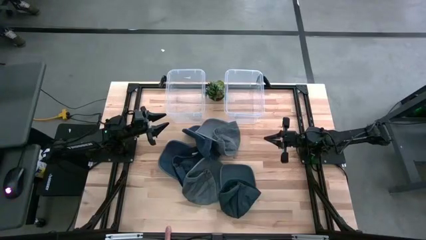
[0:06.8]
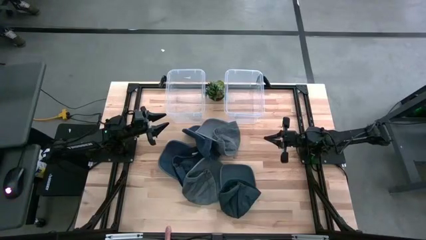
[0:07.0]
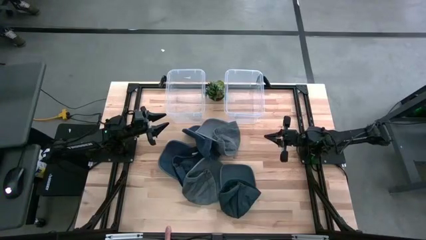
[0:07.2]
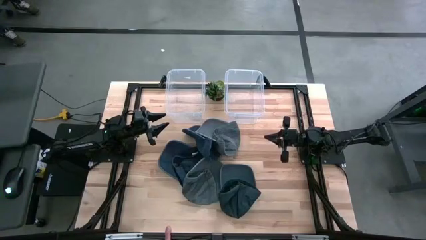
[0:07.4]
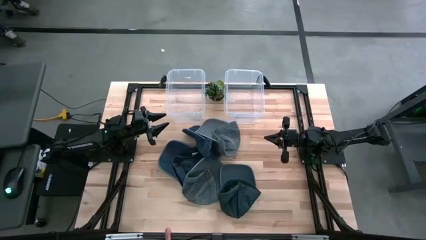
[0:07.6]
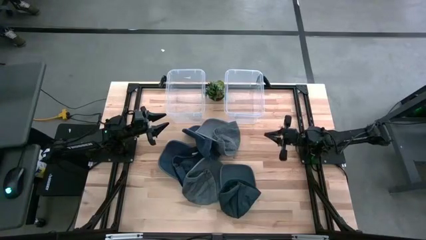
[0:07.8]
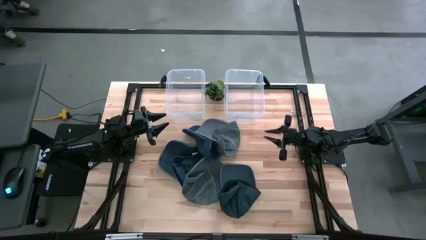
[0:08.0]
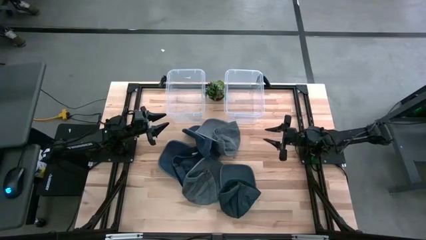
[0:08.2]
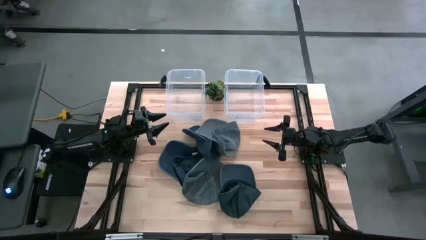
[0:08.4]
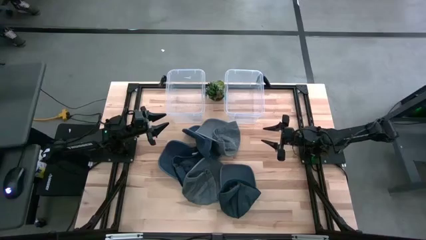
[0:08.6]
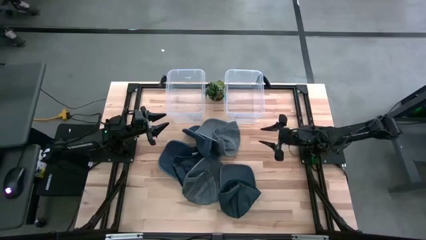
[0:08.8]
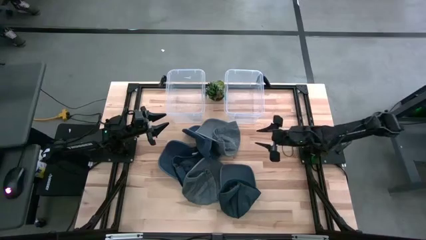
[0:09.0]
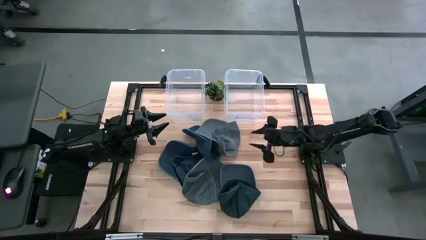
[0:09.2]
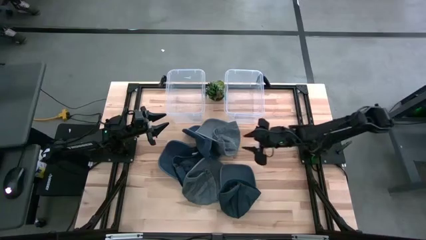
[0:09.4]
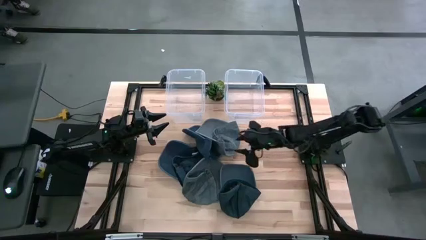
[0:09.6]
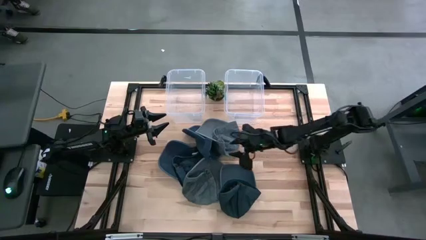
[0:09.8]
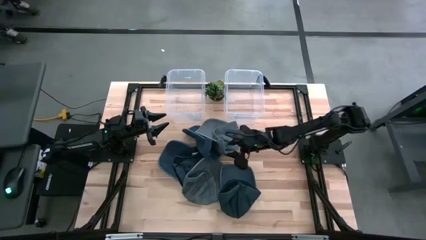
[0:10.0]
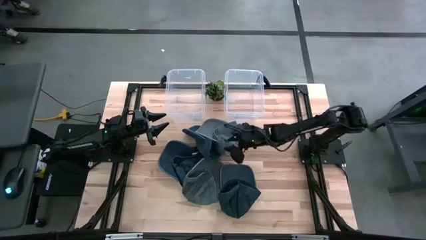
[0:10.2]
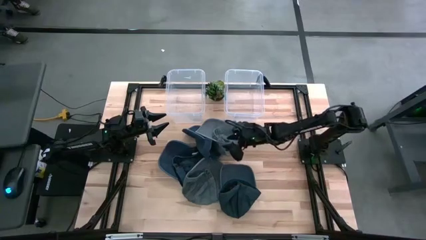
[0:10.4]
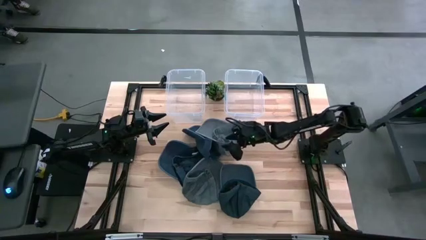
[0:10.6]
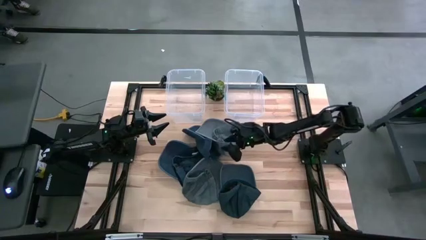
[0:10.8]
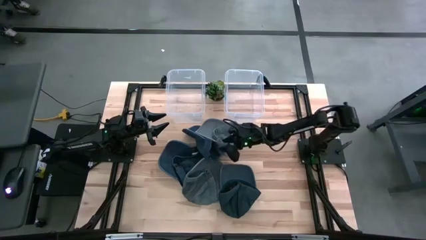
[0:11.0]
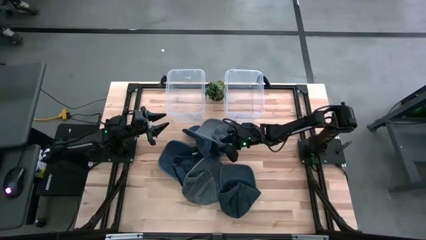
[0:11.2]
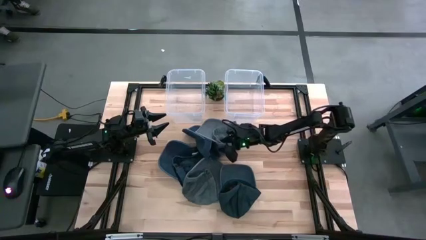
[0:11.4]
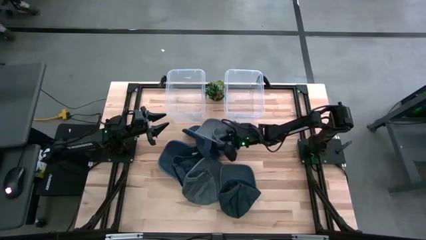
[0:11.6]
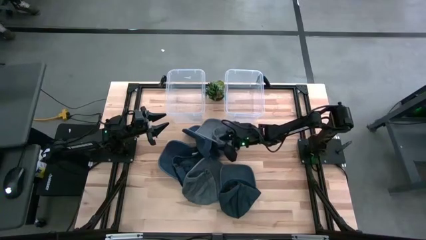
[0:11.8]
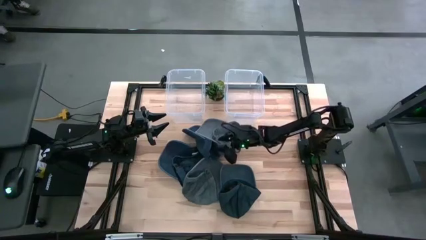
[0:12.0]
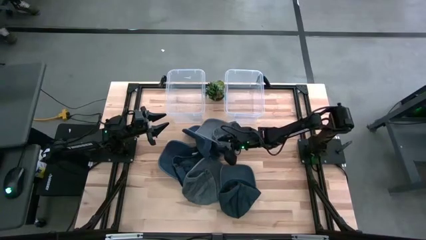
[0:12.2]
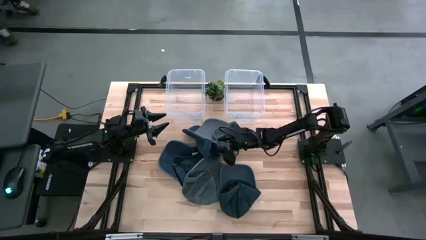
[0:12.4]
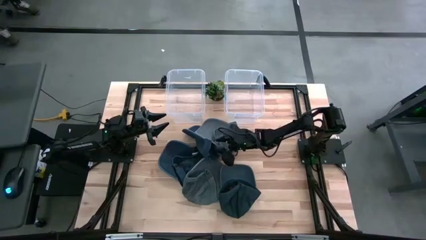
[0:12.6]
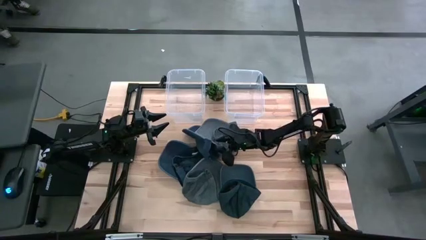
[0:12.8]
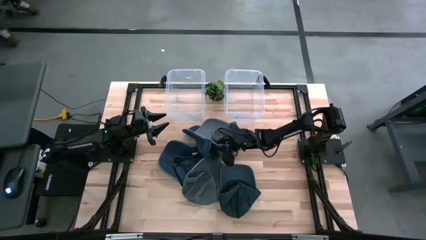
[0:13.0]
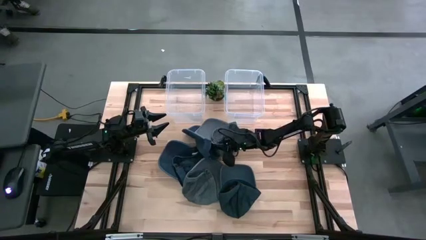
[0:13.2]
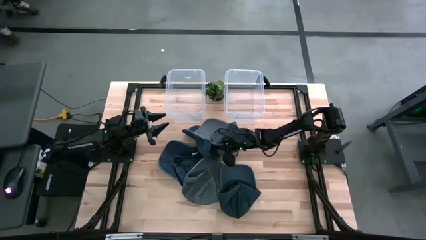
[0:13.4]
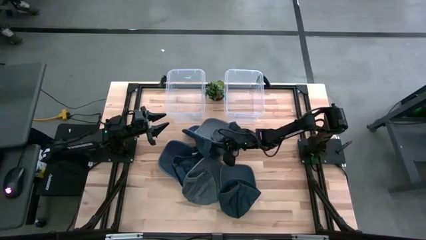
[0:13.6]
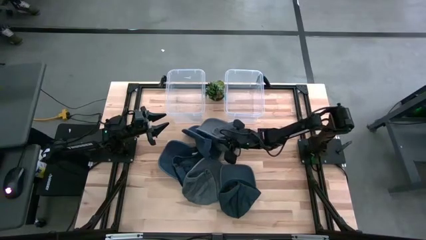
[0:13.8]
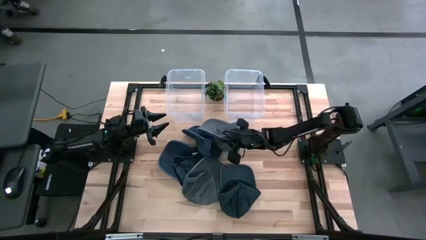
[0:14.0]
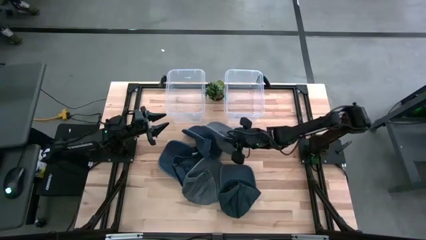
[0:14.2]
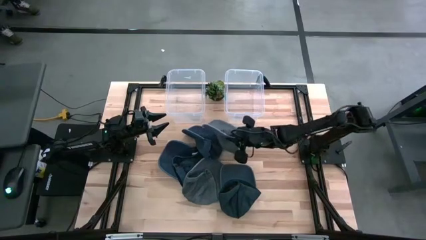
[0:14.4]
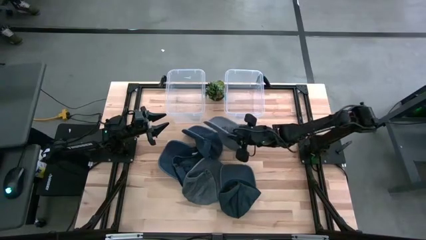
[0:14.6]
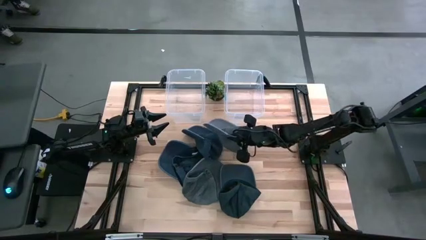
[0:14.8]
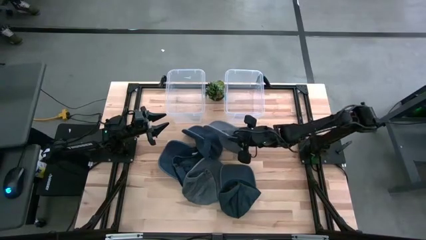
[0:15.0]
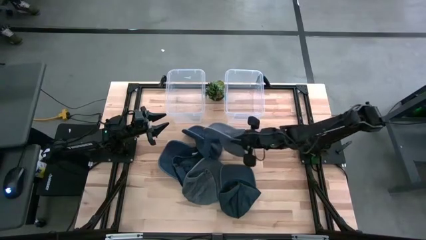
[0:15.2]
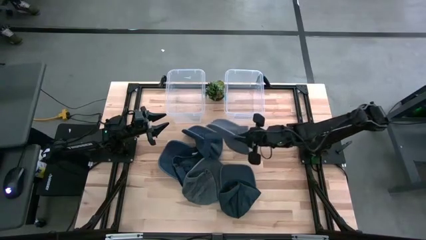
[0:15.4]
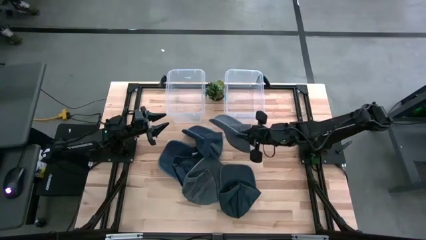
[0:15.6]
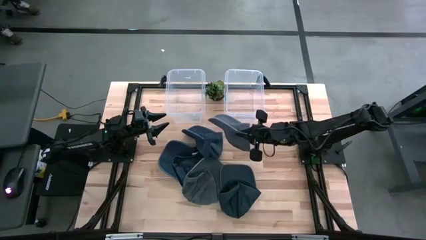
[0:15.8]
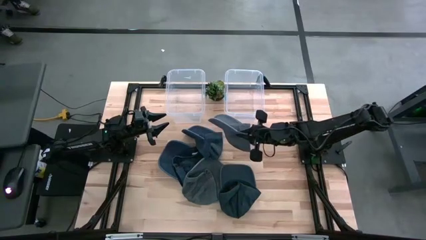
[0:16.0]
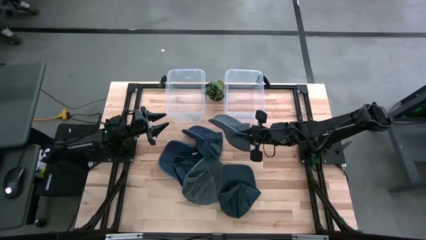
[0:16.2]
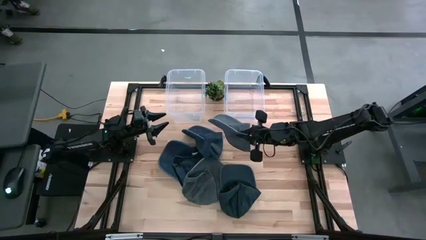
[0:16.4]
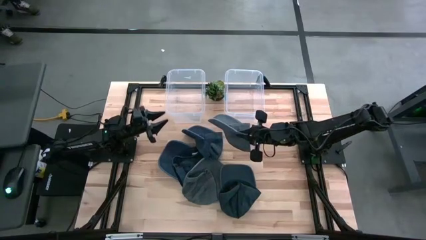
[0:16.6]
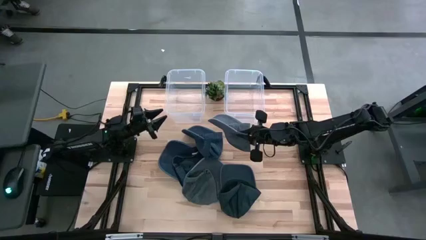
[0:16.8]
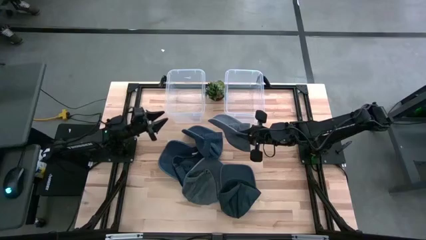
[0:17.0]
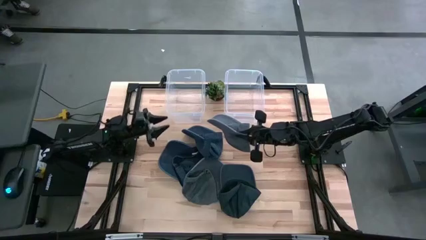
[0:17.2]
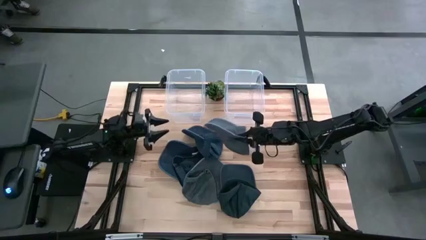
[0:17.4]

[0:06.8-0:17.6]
Task: Pick & Place hat
Put the top gray cap into the left transparent bin

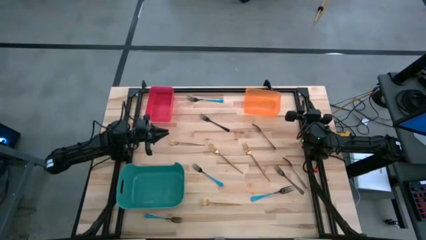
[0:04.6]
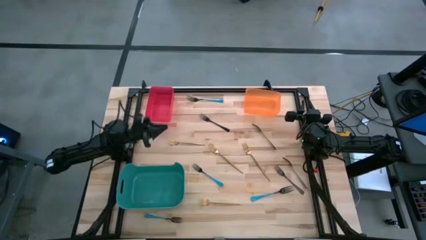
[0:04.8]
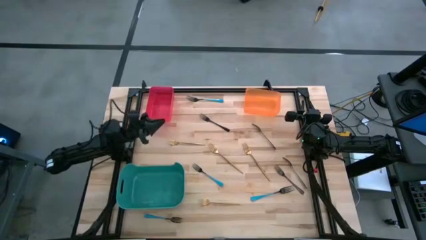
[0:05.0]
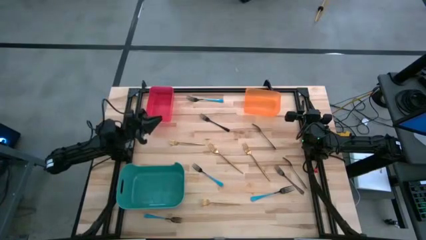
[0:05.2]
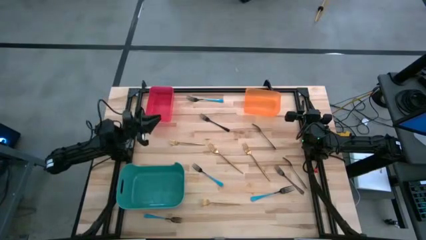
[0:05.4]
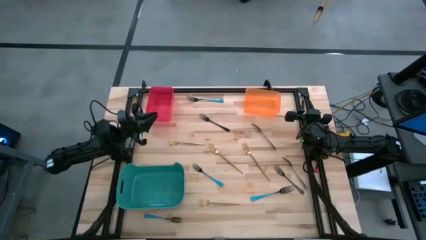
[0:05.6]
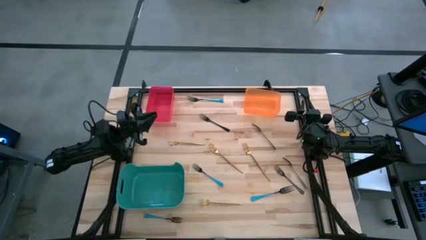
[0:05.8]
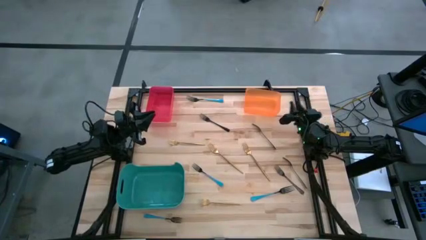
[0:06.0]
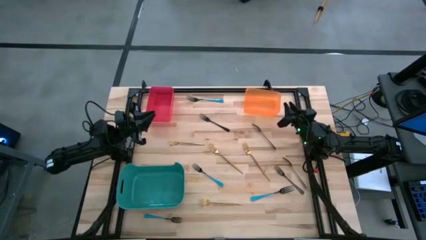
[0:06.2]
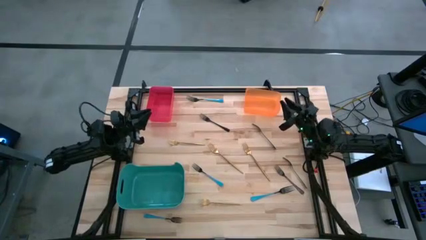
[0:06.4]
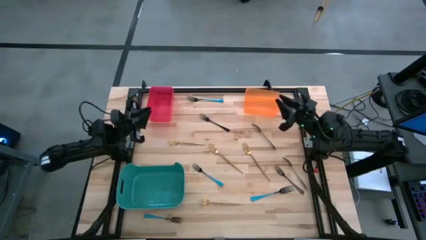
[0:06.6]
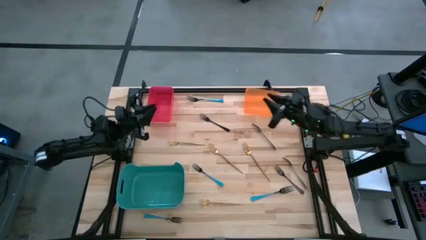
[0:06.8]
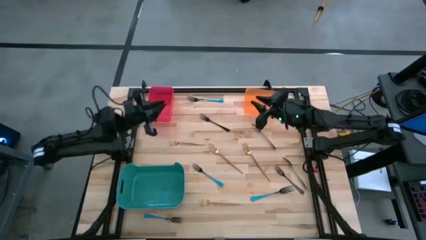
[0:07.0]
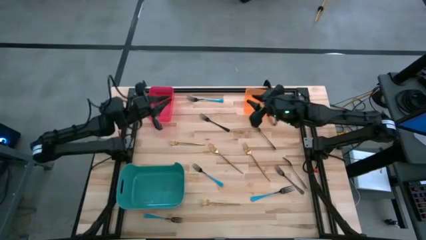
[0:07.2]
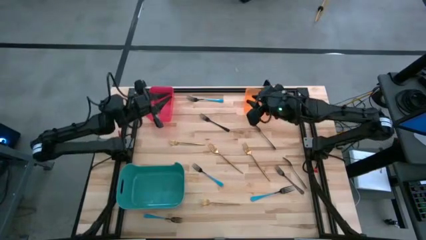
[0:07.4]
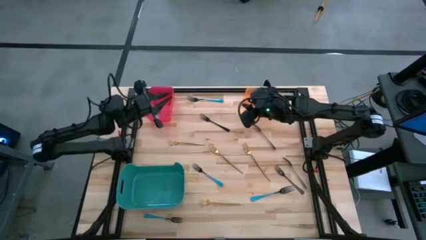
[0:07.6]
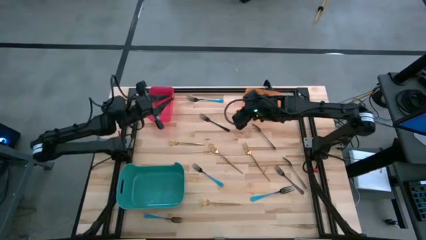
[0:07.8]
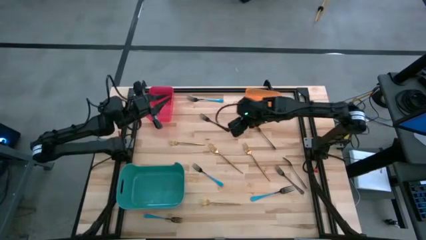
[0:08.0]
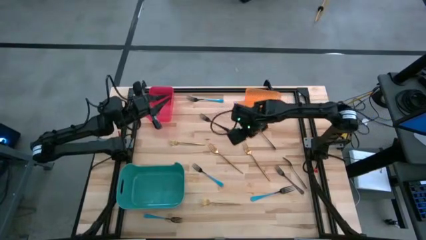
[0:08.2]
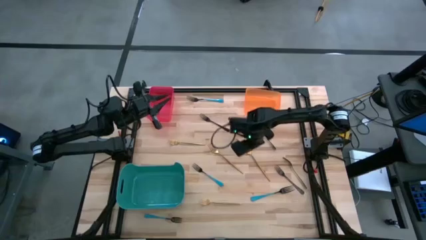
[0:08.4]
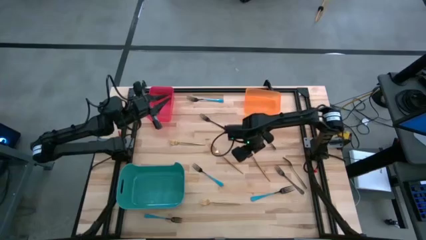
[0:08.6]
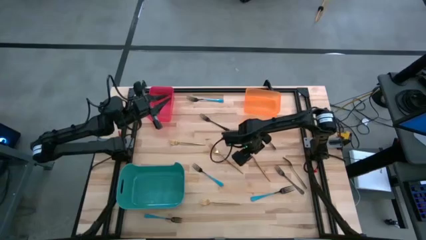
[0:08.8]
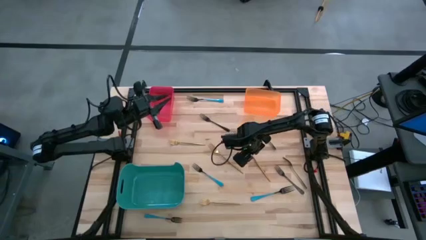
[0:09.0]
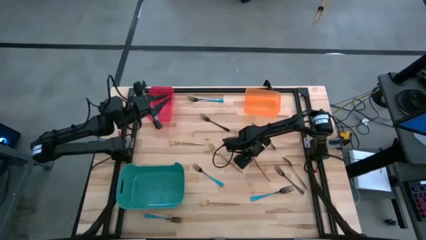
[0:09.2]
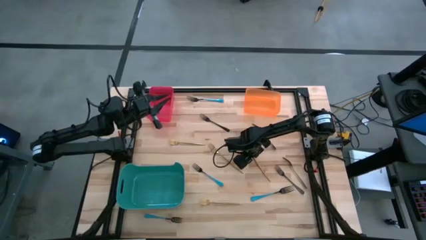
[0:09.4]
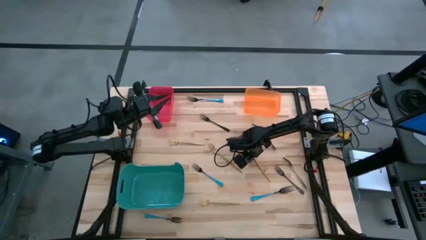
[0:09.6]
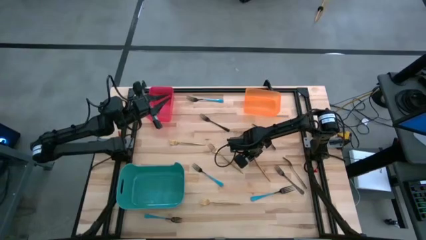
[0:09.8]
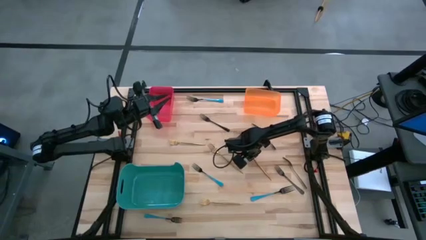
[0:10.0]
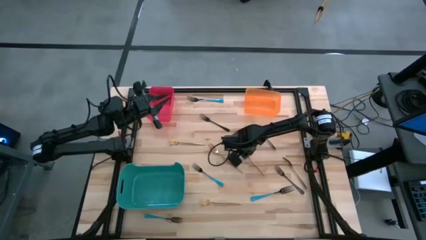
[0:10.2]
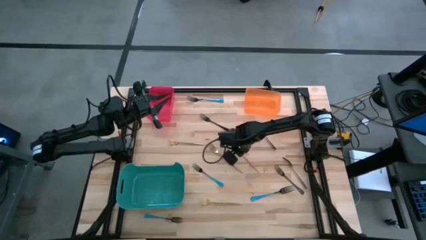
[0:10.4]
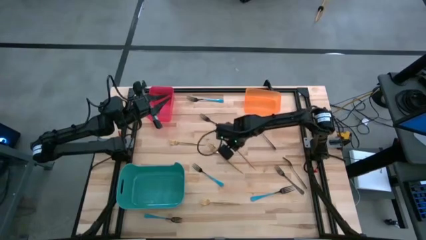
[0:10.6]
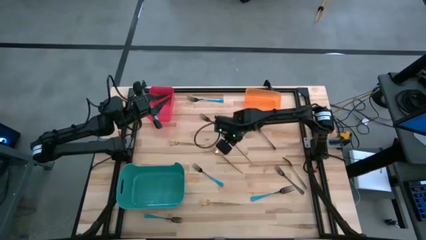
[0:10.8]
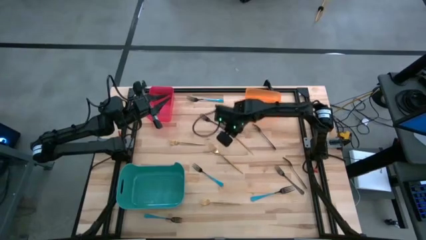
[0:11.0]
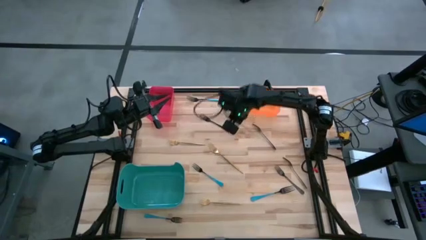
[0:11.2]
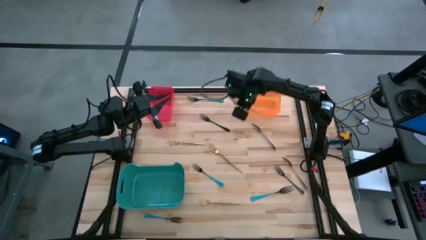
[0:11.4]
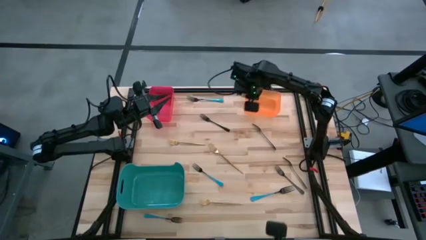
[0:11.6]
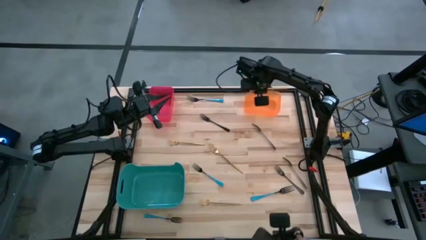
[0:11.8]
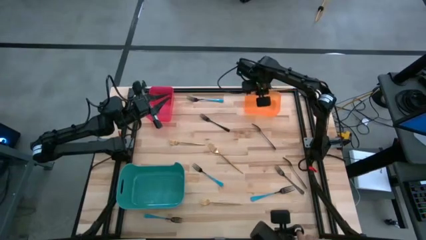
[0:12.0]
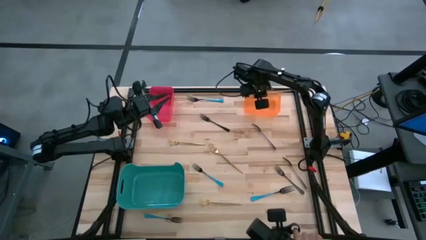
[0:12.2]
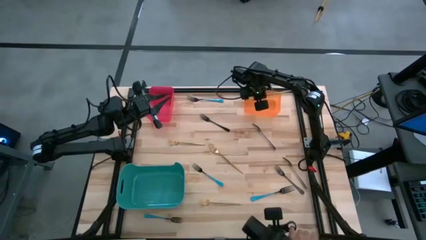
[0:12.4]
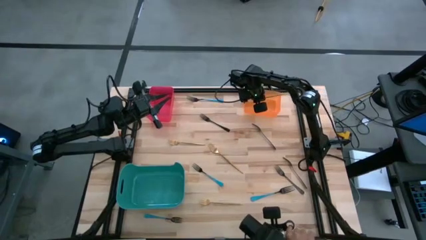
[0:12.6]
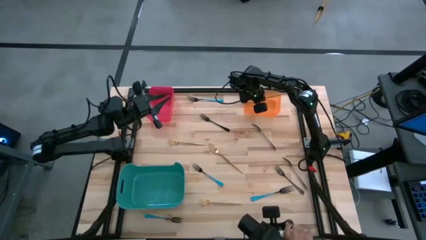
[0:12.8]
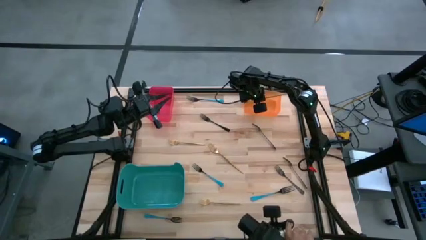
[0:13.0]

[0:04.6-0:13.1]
Task: Sort silverware by color (type)
Put the gold fork into the orange bin
